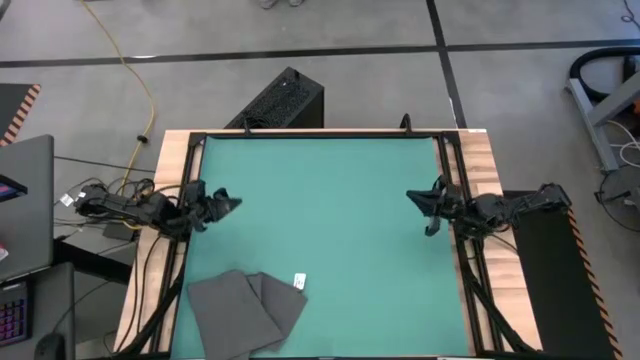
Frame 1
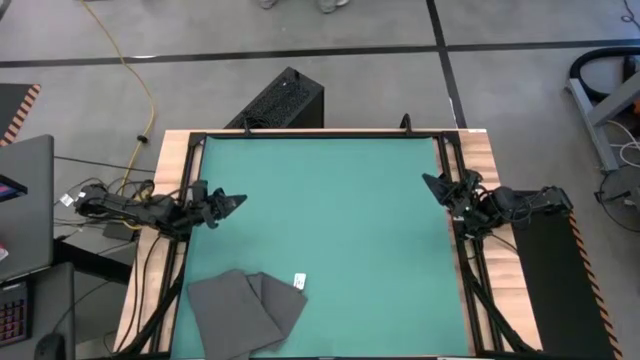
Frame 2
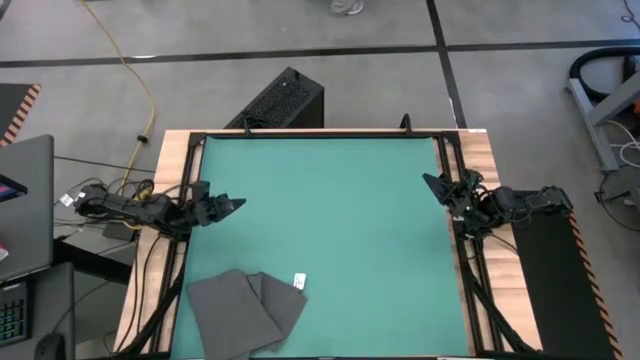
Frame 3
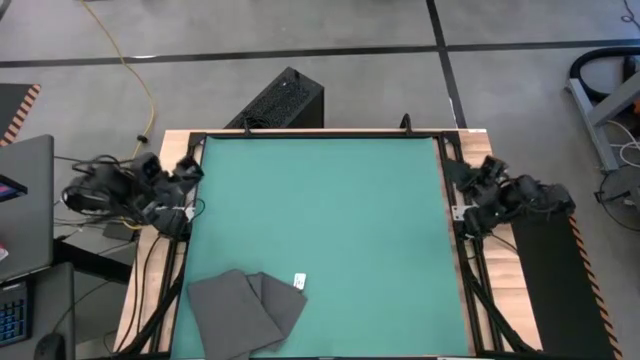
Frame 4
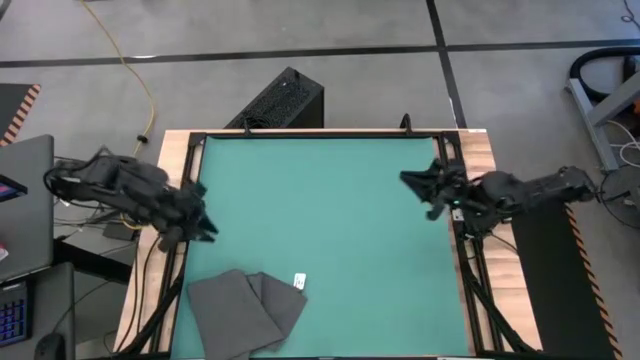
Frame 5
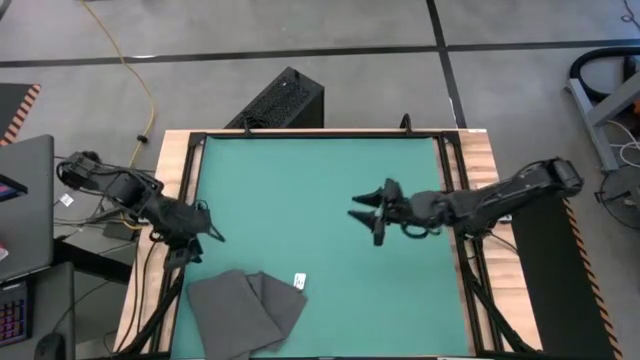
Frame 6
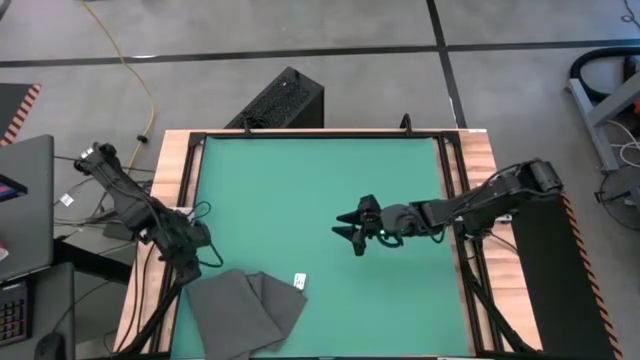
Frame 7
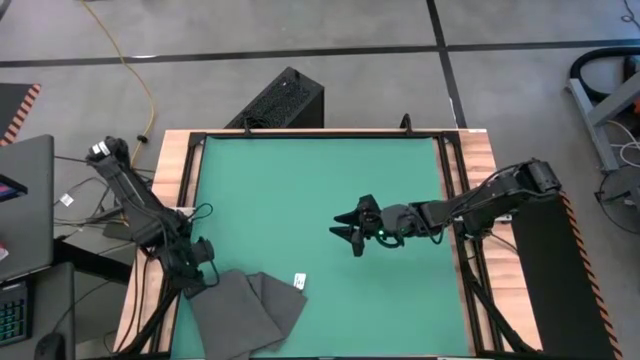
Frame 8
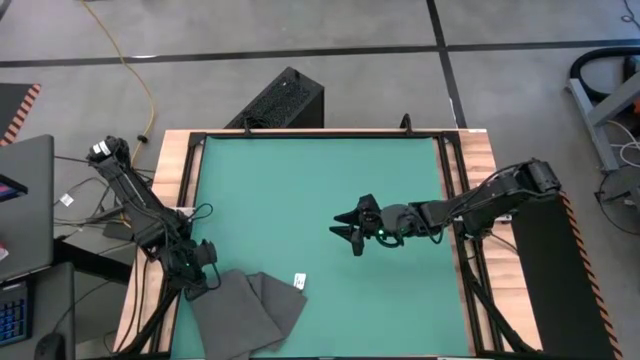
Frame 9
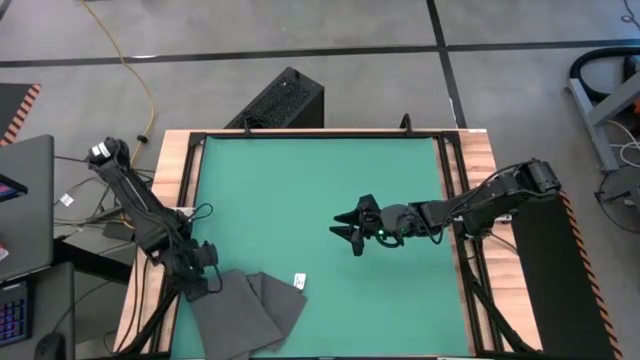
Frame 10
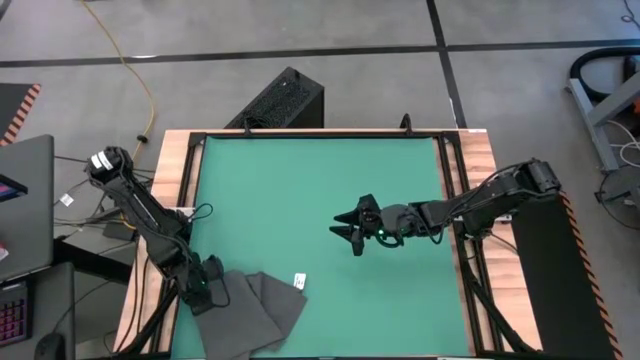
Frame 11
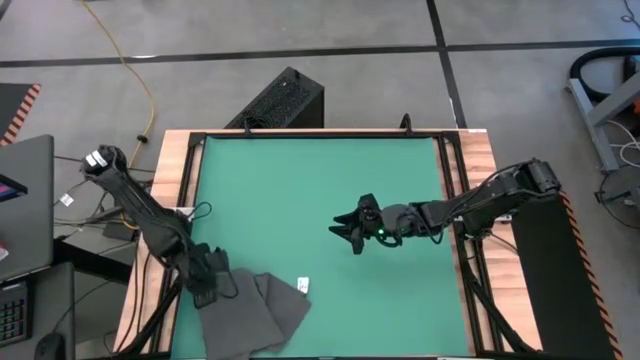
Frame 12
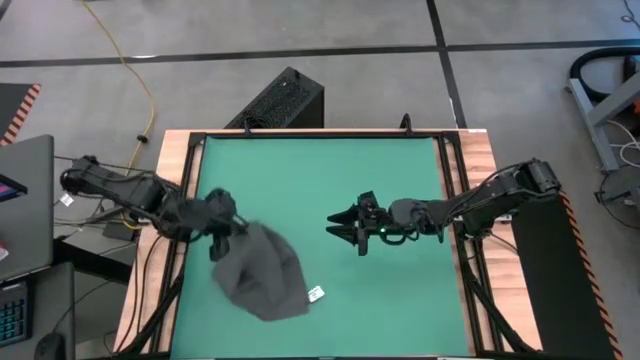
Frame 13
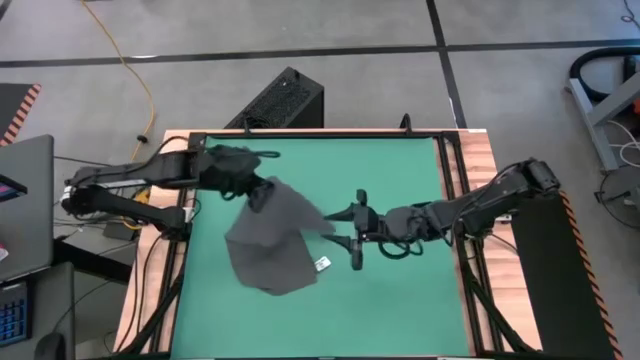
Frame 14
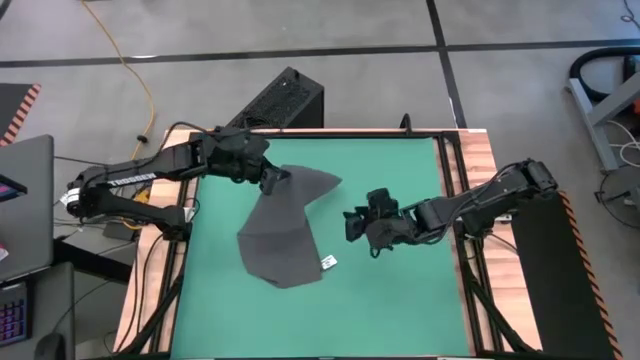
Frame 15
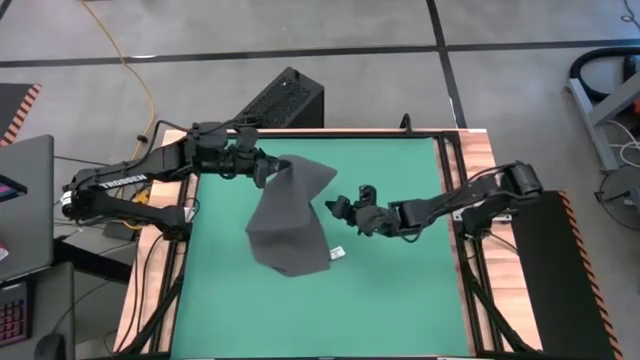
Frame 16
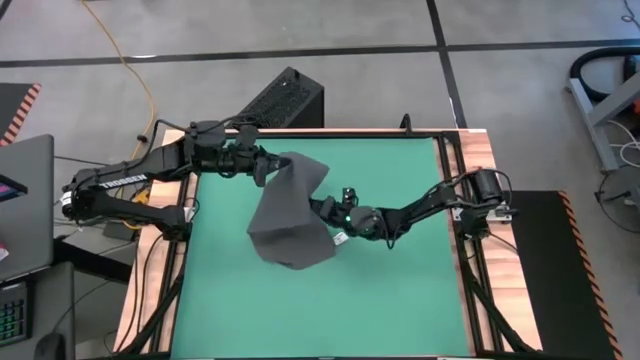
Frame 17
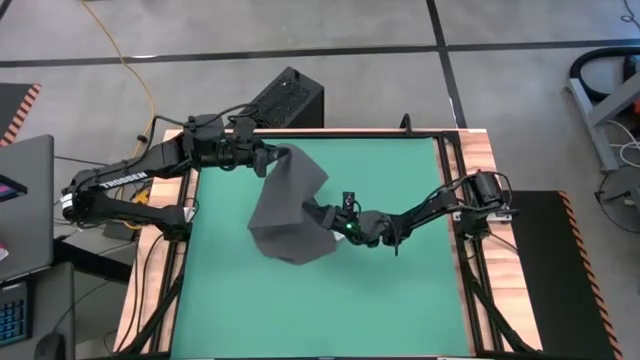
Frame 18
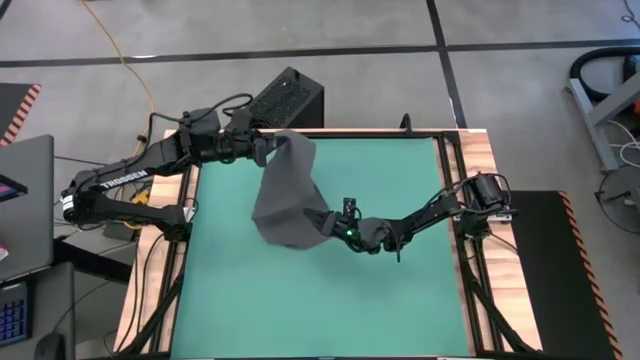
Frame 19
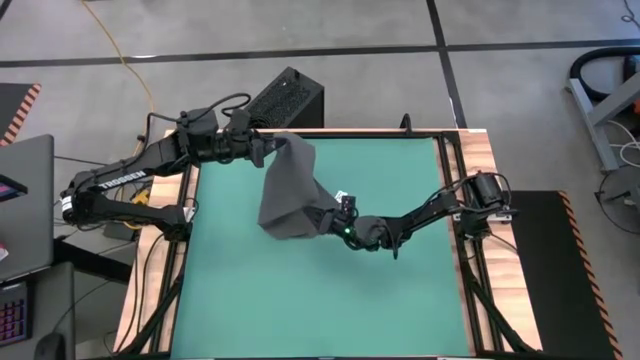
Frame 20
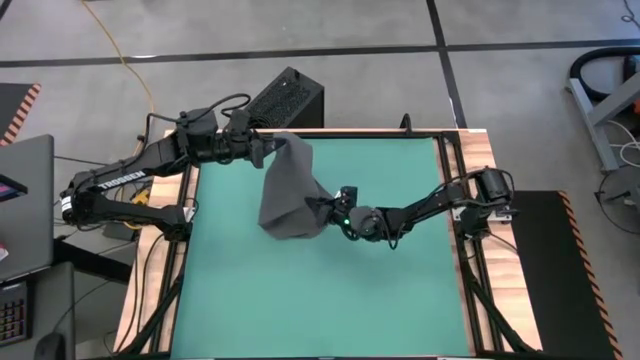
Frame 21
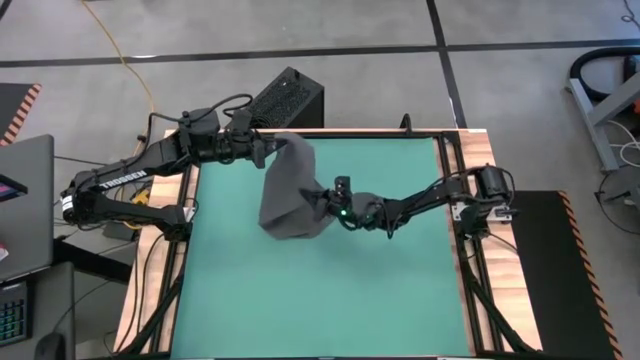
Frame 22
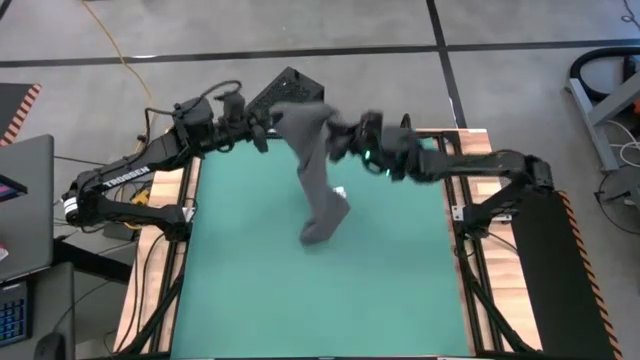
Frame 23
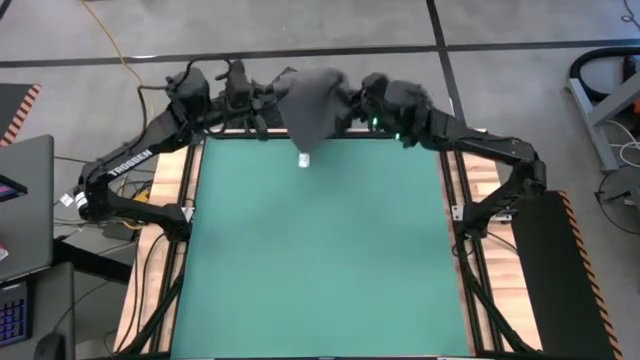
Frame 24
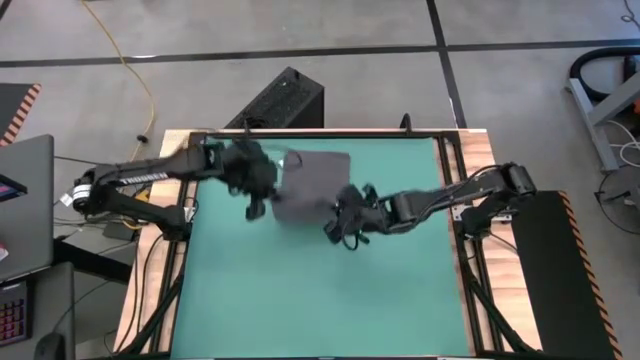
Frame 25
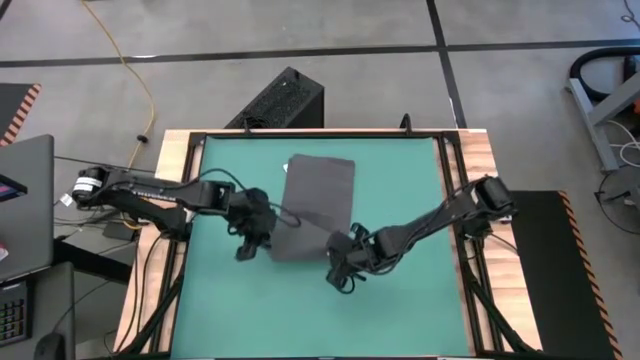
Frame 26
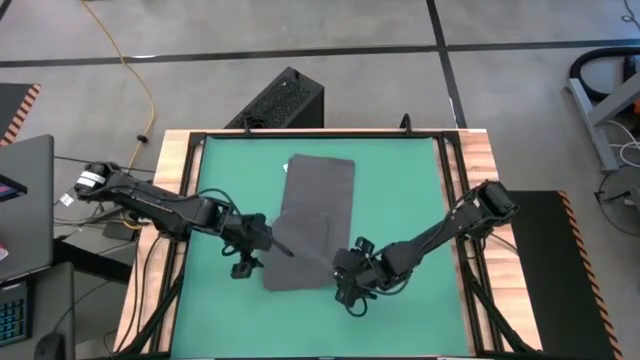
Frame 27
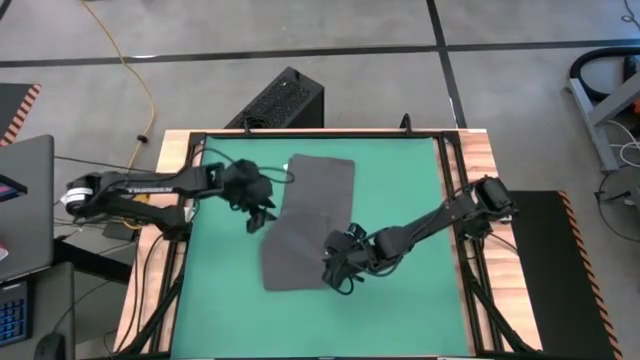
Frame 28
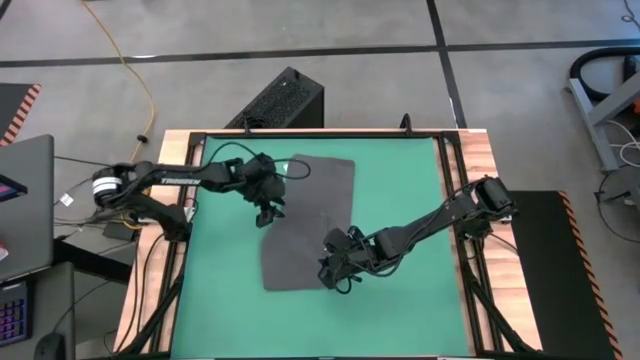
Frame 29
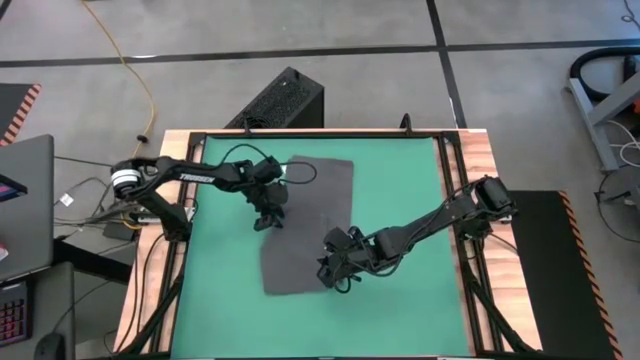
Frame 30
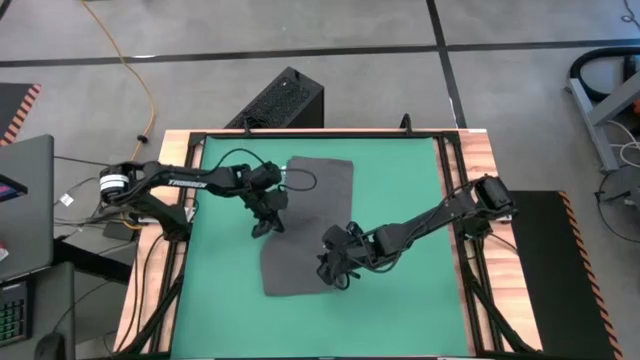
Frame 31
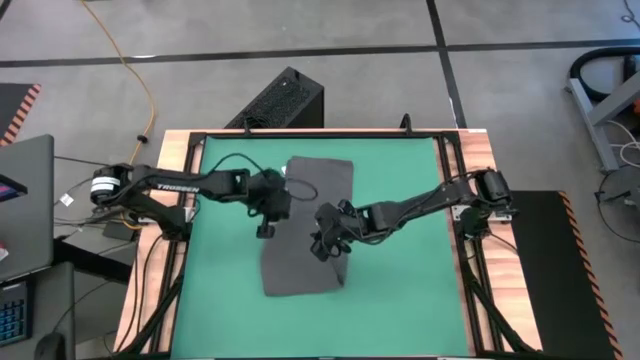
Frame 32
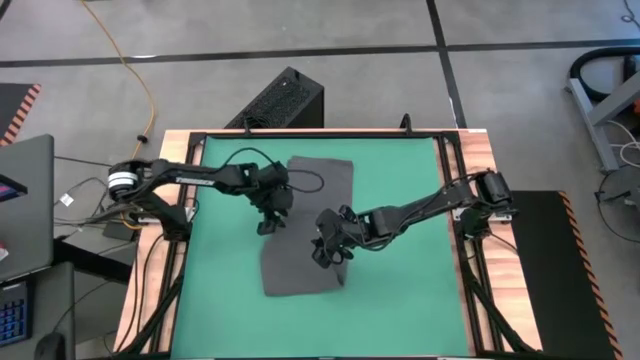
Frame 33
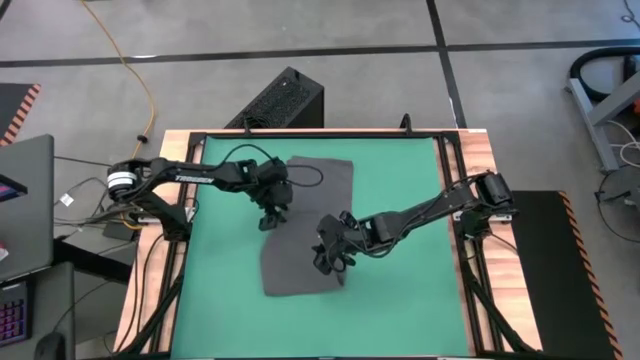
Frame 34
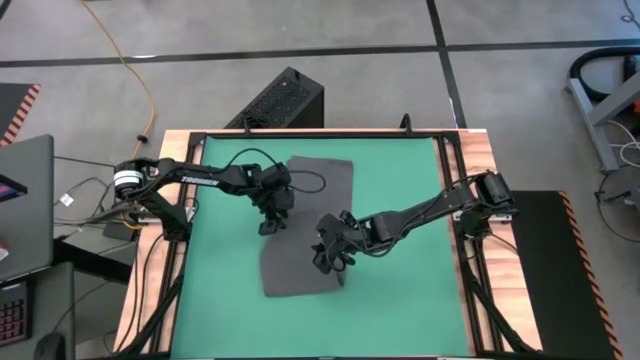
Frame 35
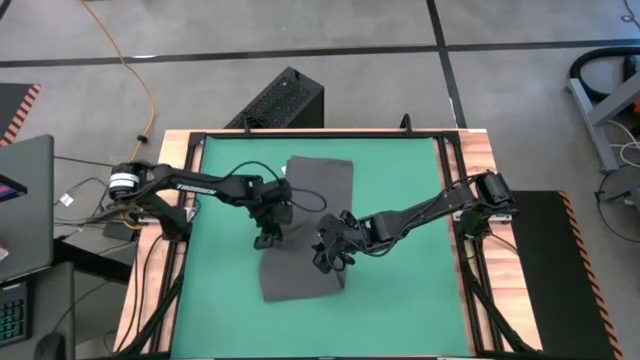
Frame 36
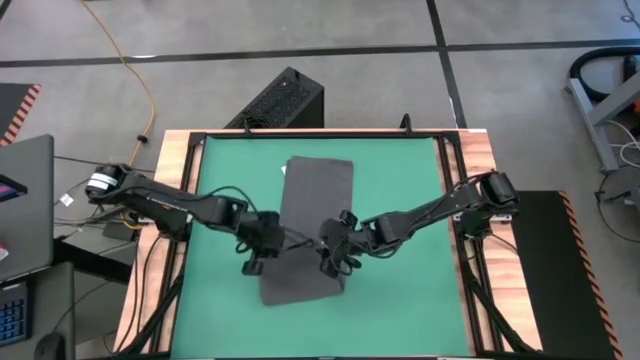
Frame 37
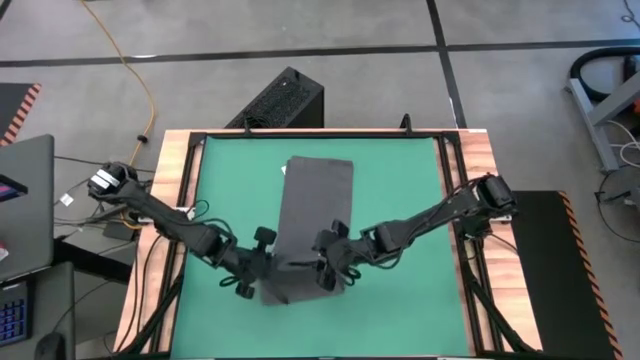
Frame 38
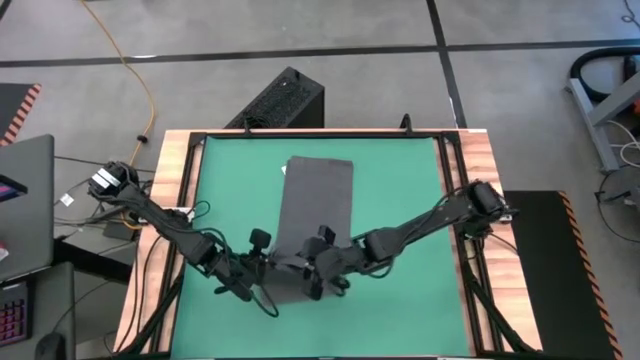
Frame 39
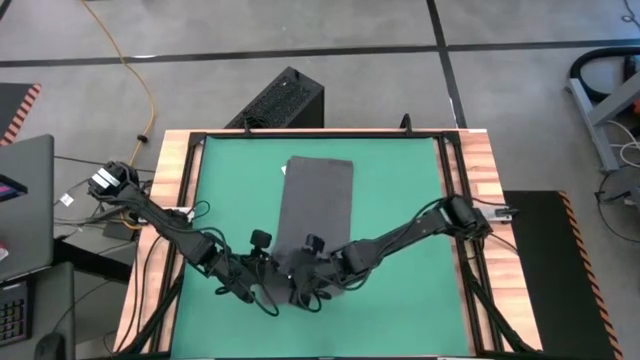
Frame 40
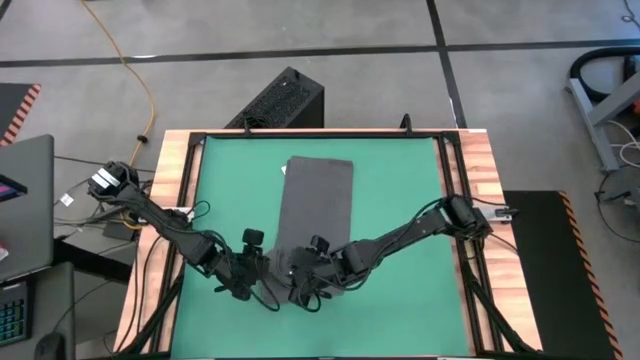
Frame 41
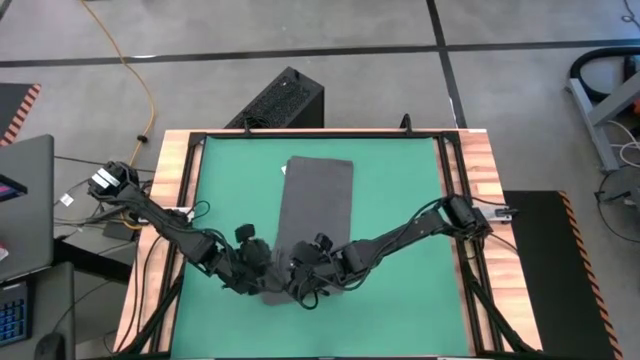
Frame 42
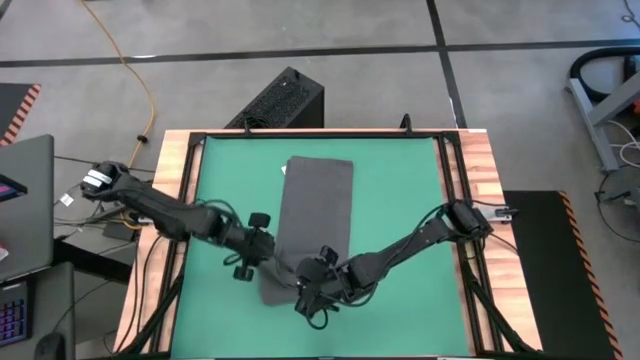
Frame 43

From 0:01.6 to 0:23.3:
Task: Roll towel
Fold the microfiber towel
